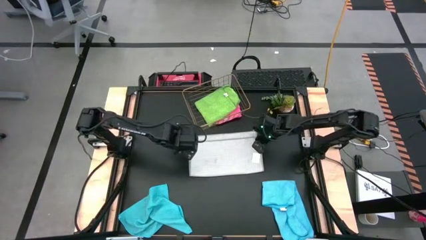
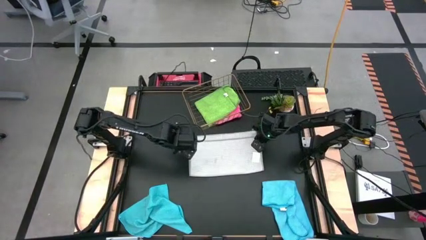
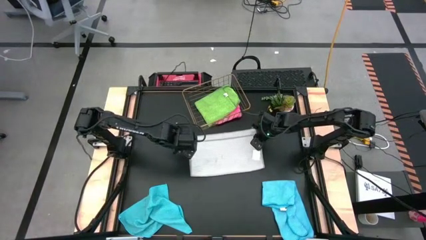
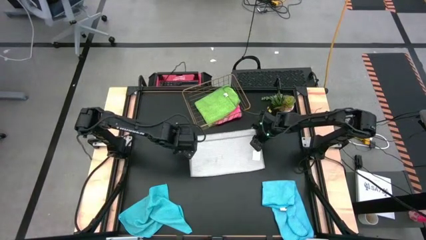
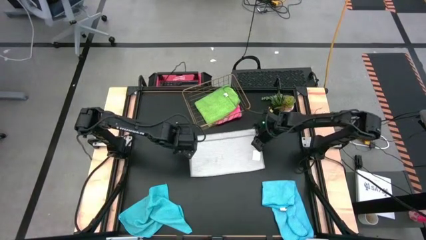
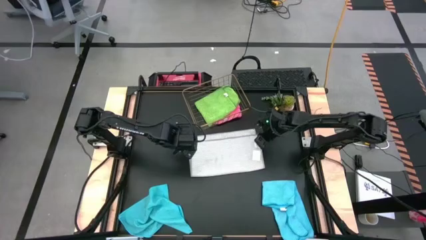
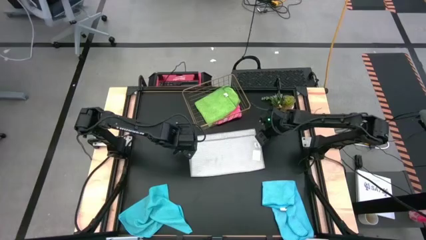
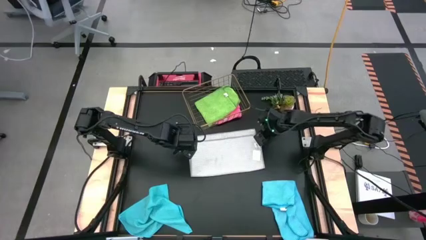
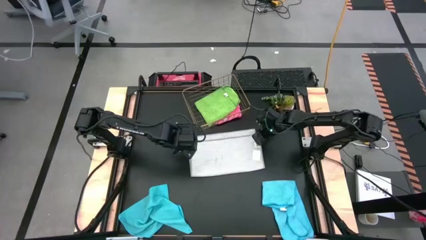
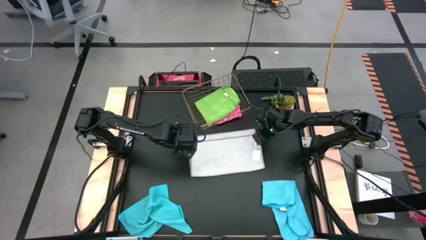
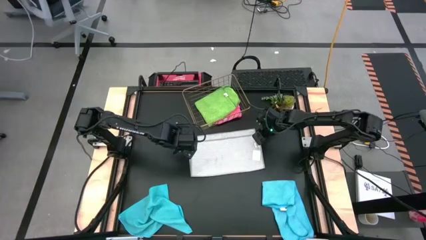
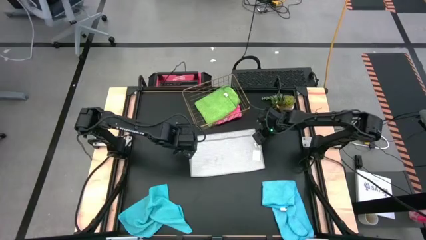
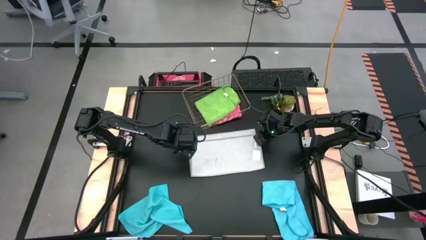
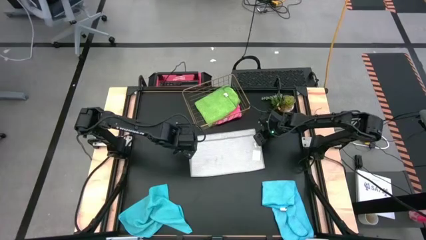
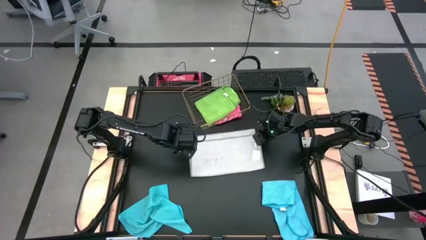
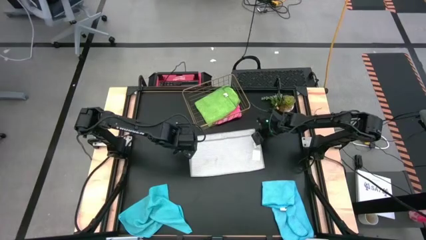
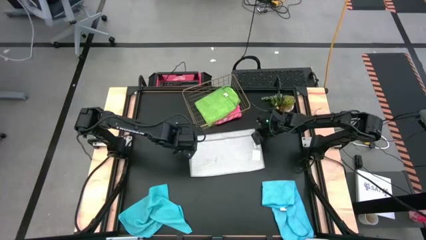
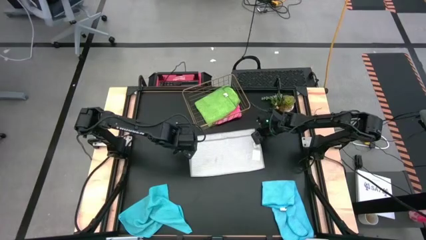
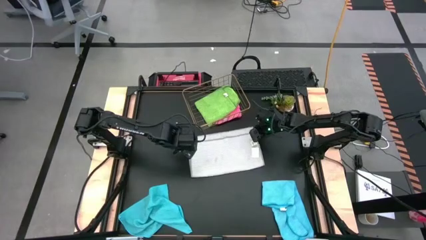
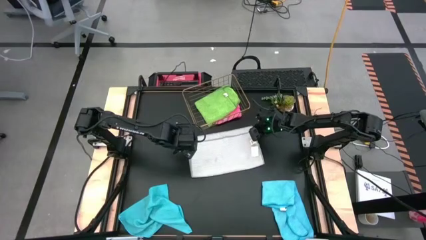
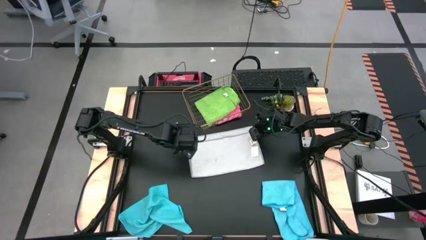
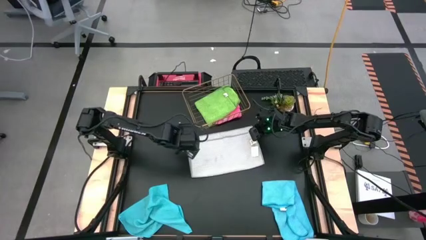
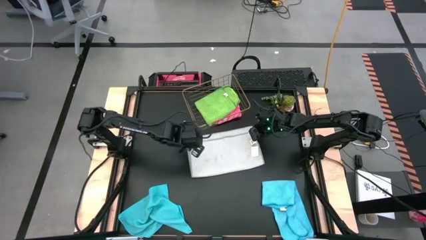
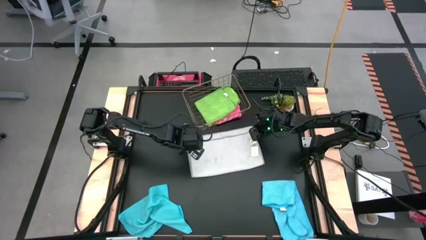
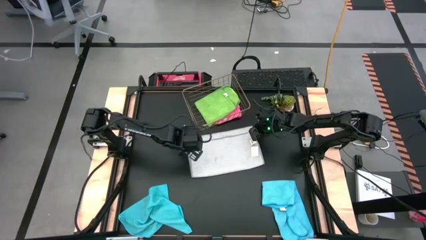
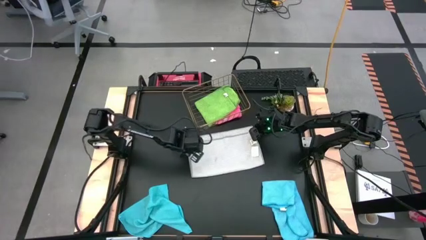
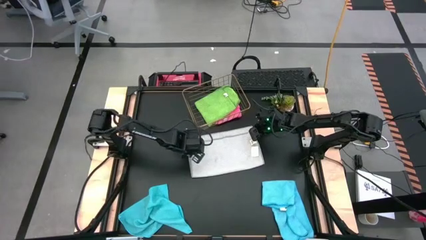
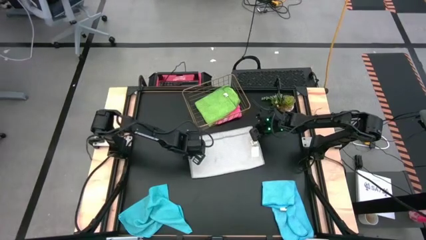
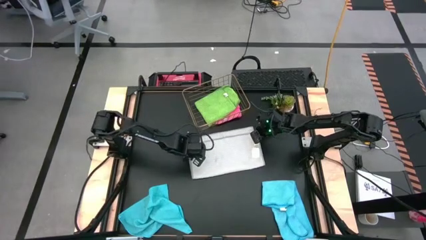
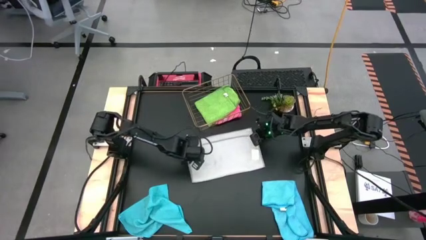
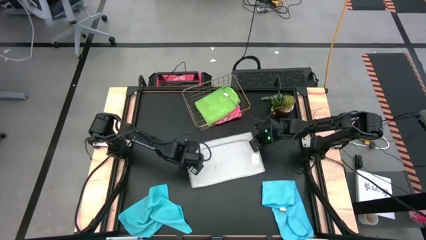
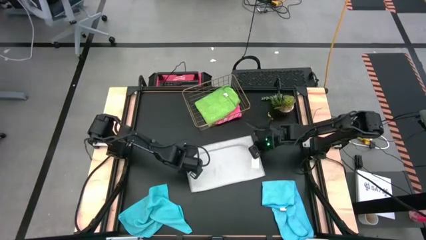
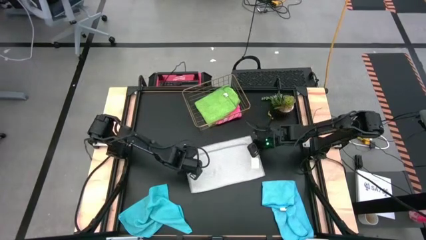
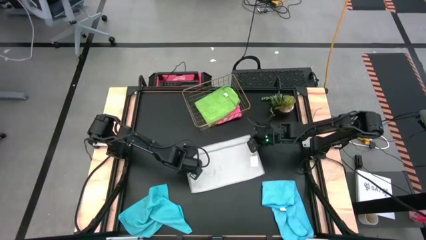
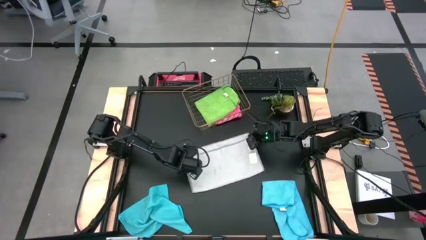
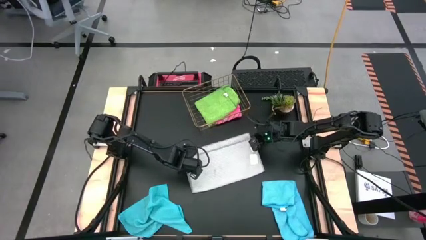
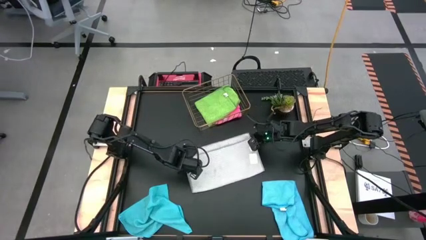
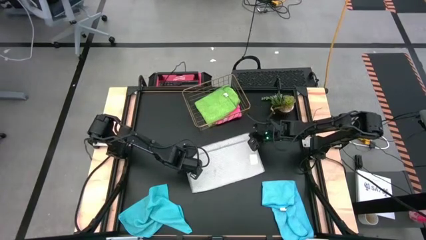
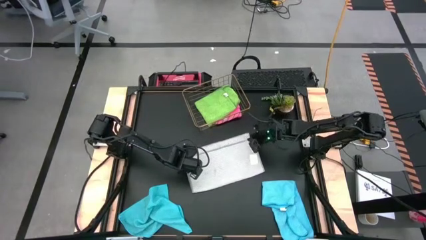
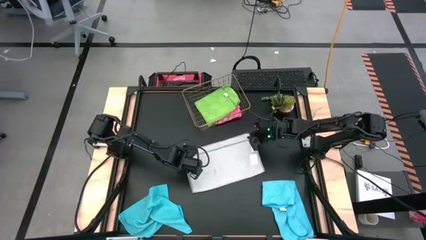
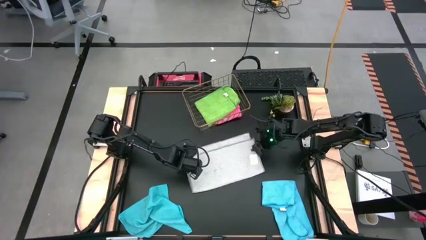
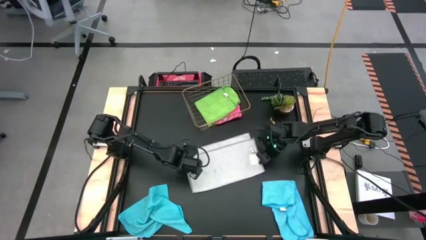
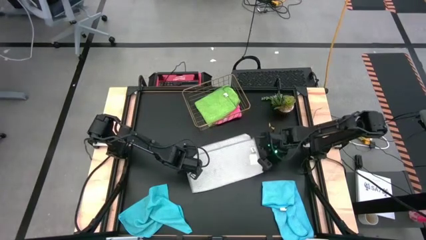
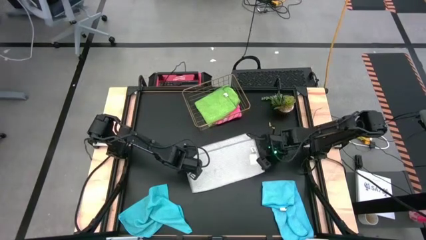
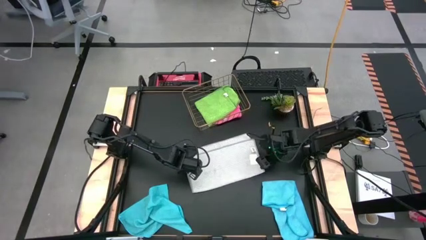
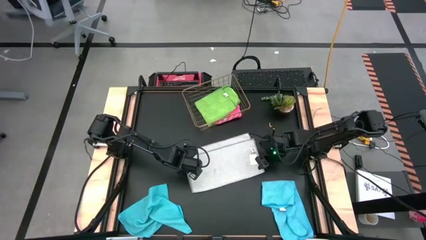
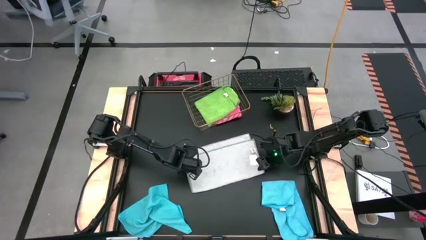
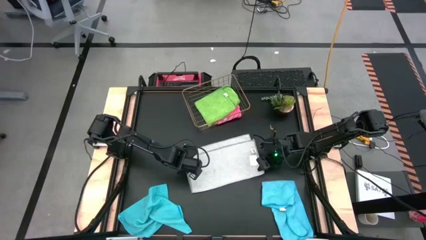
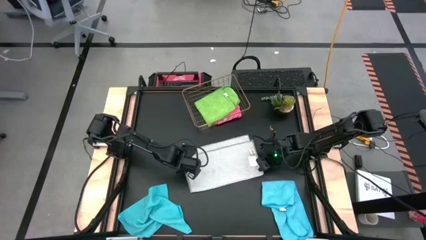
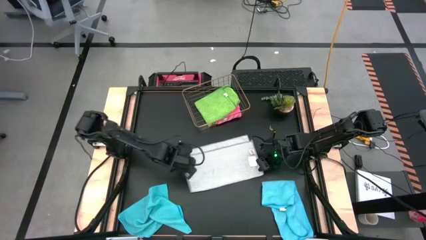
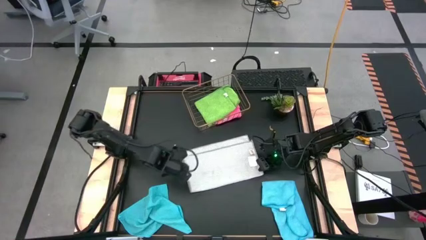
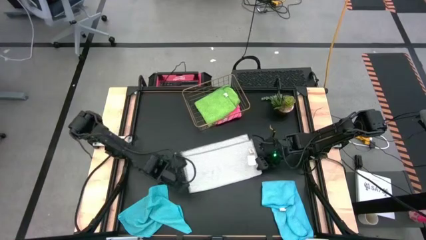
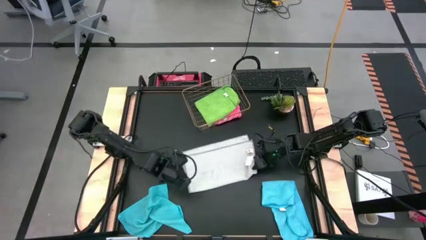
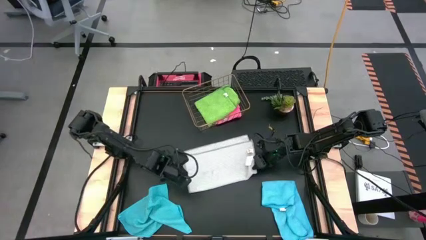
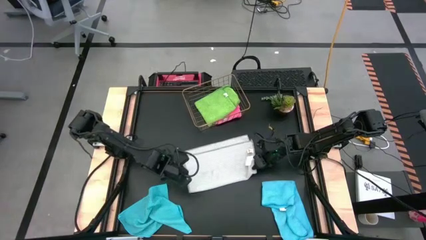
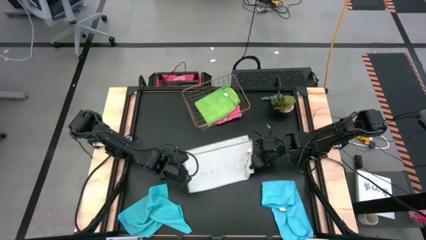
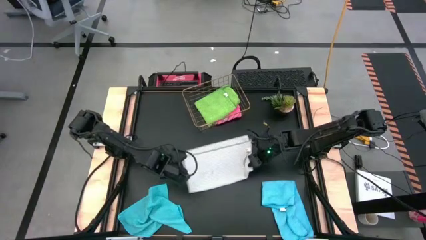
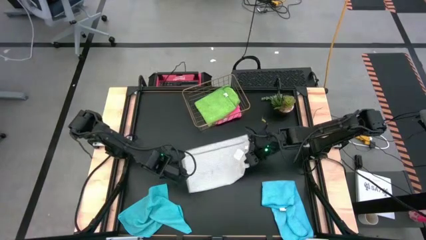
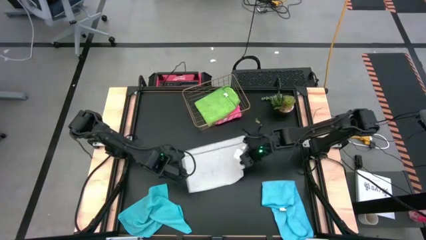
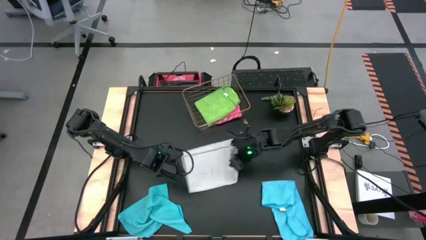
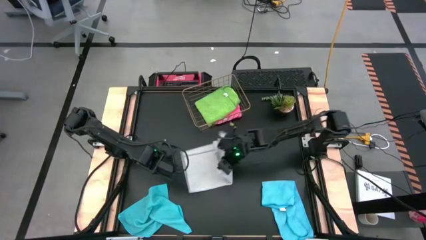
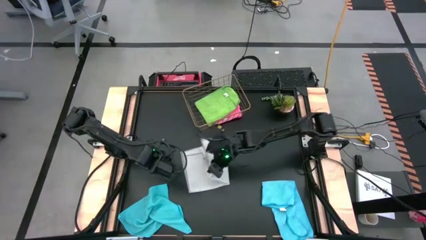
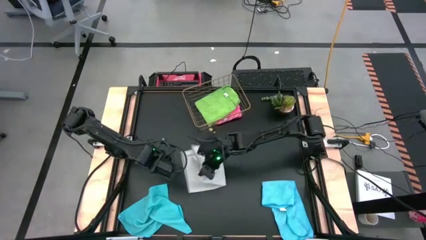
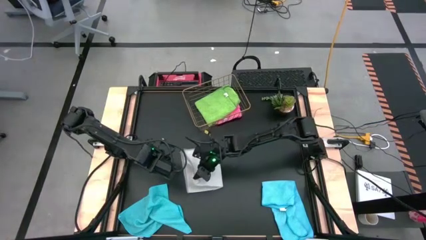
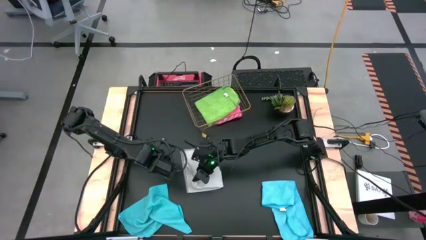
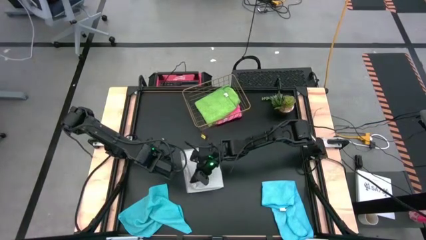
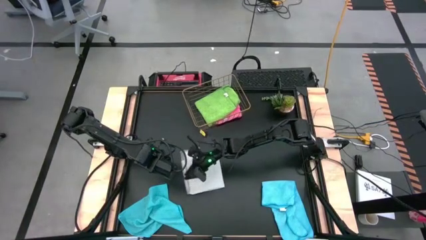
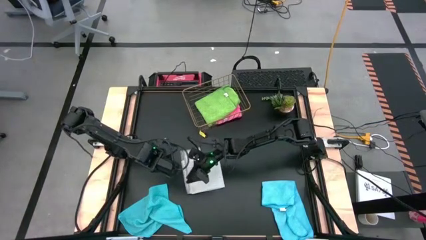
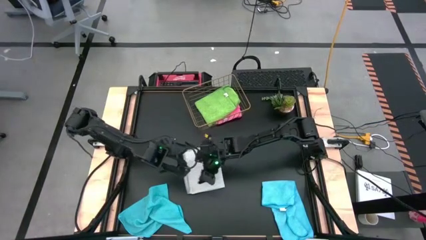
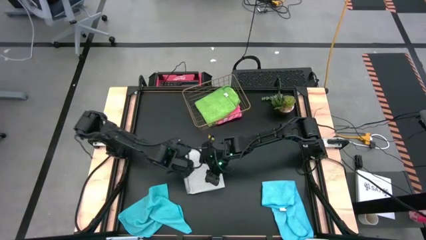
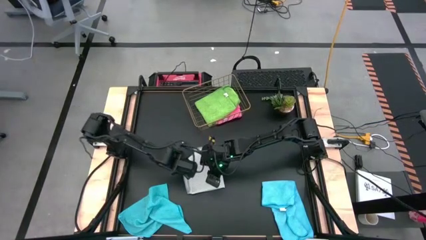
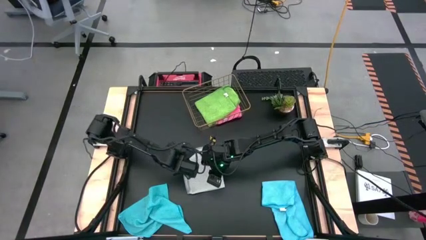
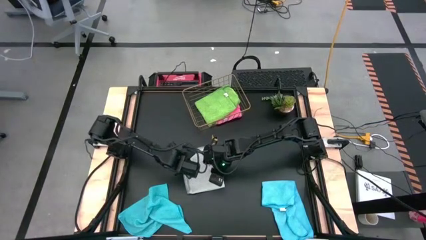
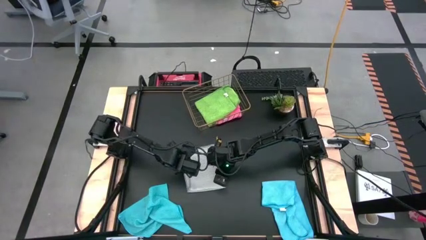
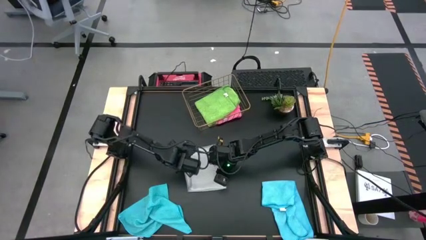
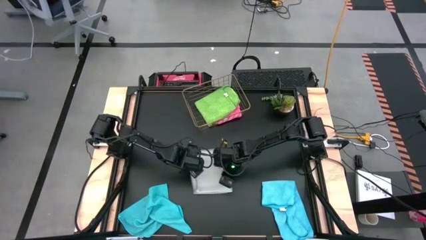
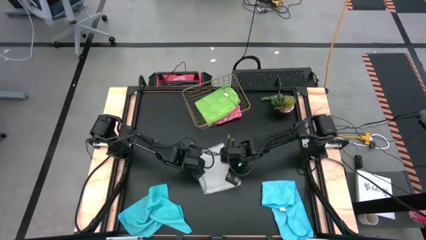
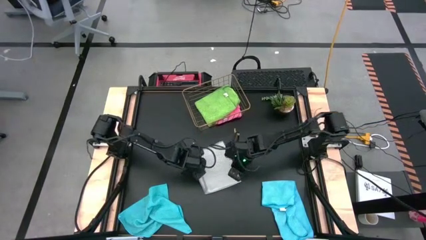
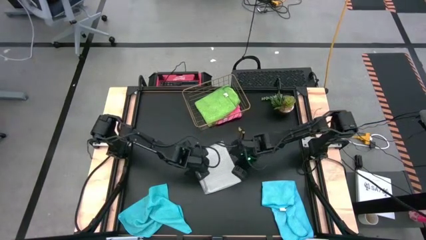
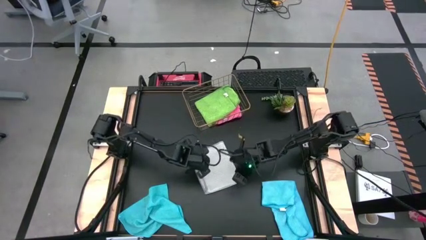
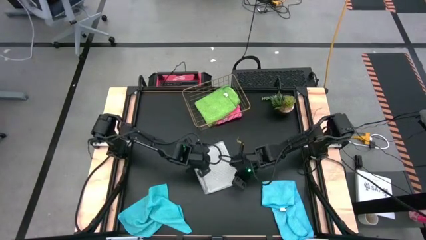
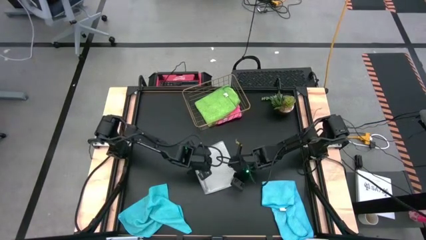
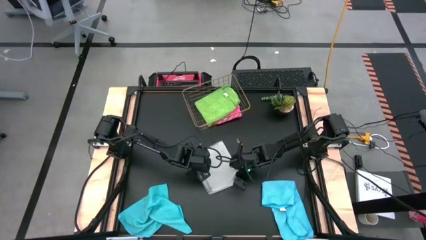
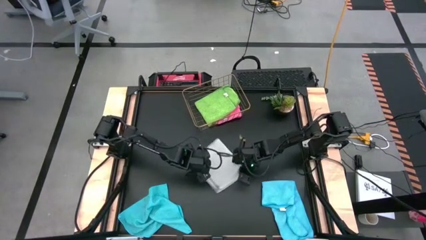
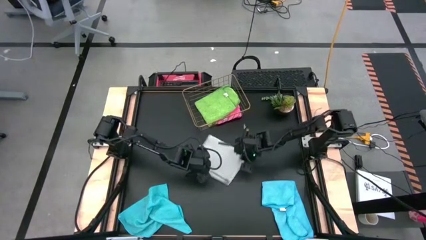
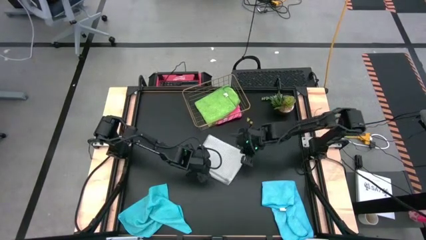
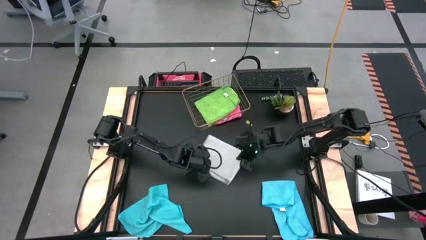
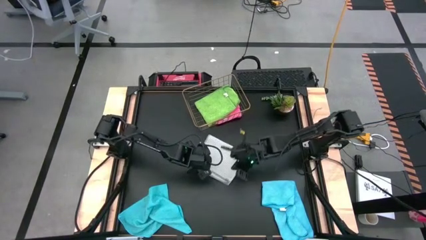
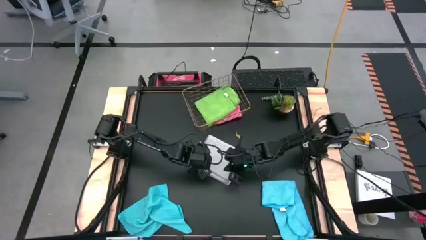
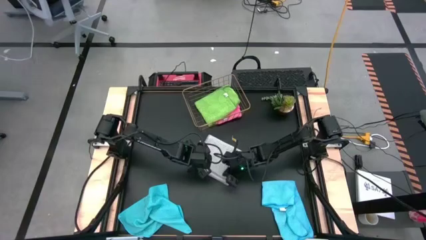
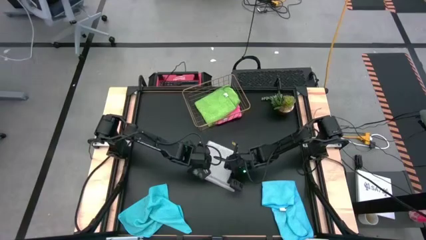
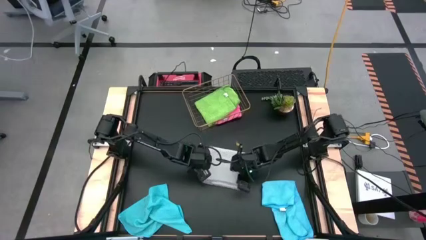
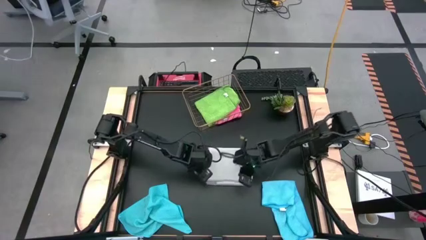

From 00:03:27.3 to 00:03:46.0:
Task: Fold microfiber towels
Fold the gray microfiber cloth
